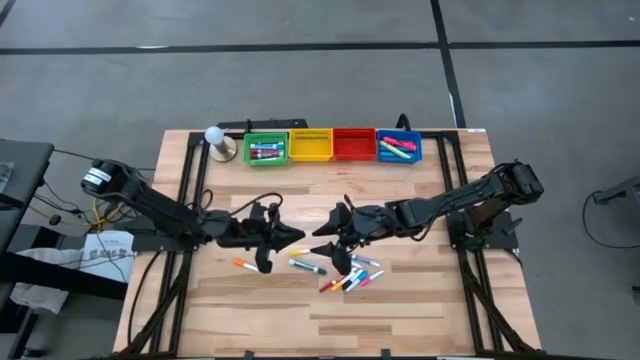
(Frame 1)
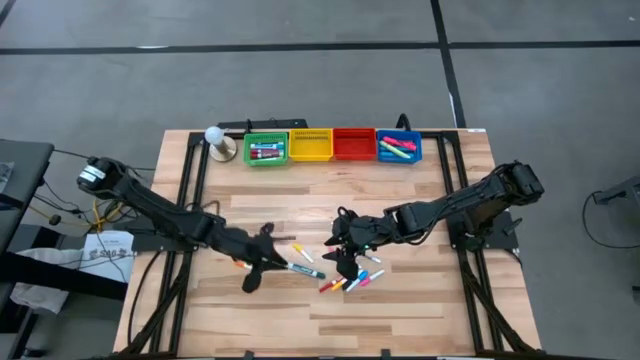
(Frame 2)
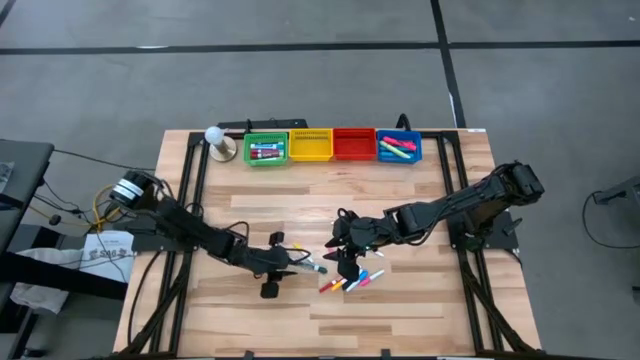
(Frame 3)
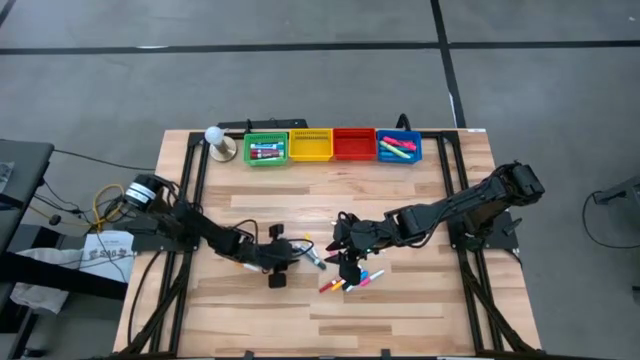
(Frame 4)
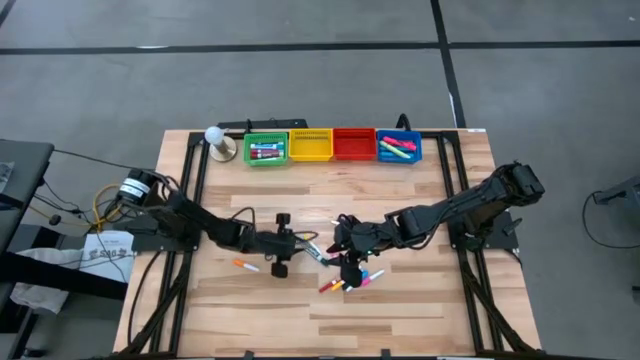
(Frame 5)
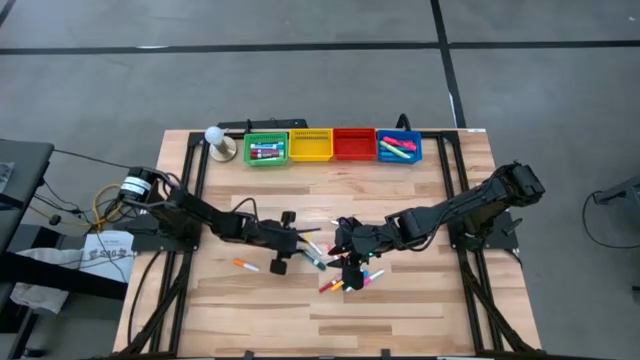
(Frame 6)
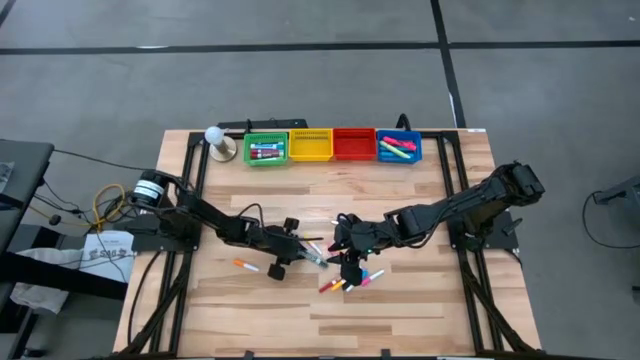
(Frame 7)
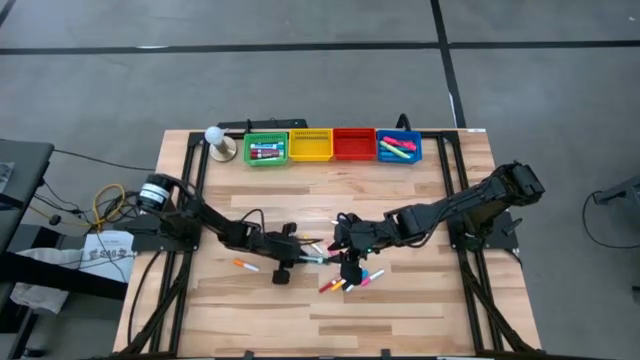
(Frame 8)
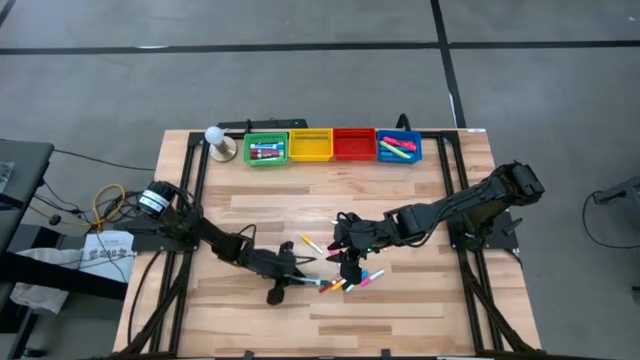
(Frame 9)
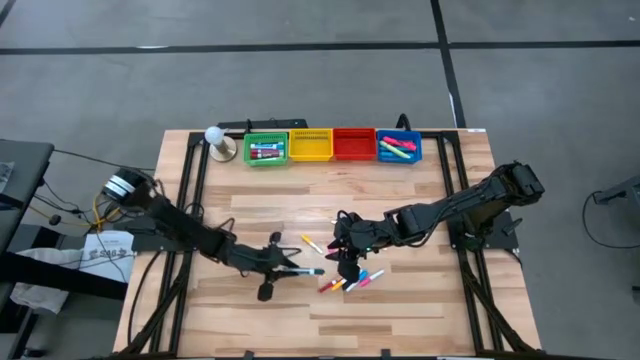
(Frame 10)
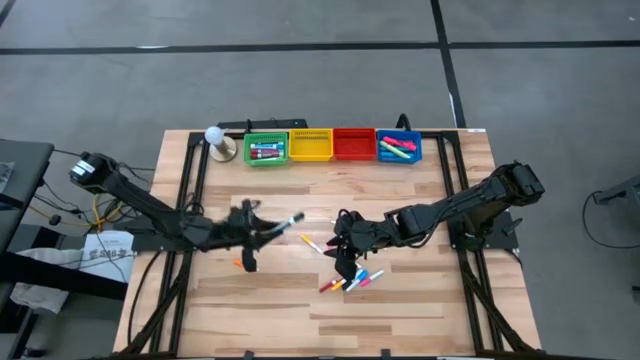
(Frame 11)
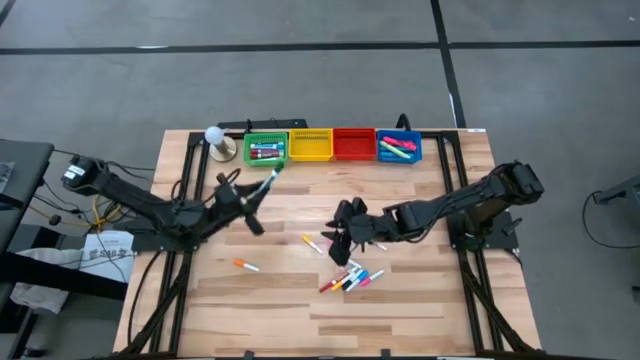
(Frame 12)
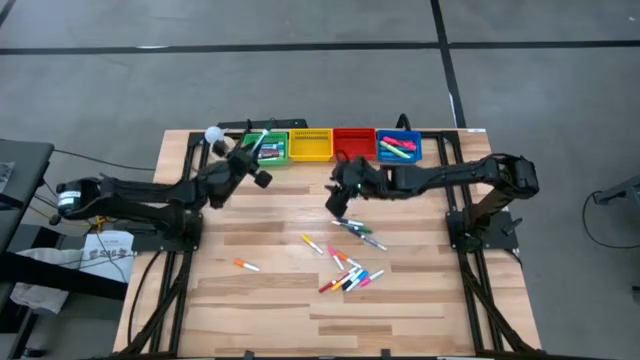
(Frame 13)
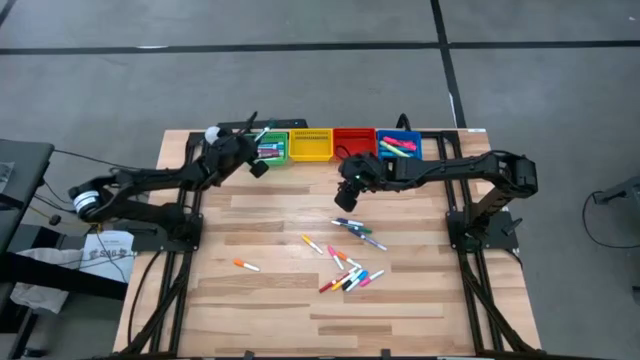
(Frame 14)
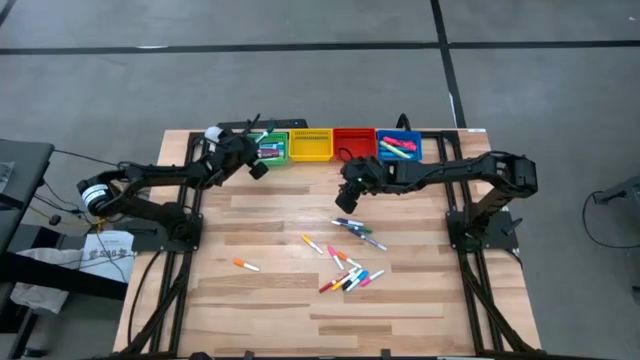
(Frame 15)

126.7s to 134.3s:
Task: Pick & Place Markers
Put the green marker pen into the green basket

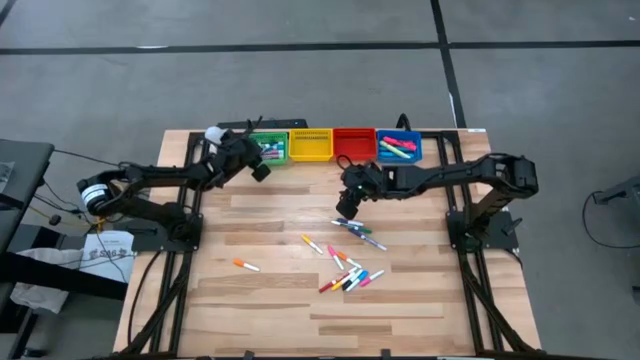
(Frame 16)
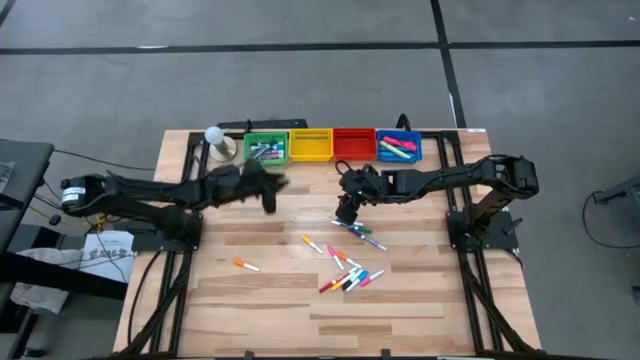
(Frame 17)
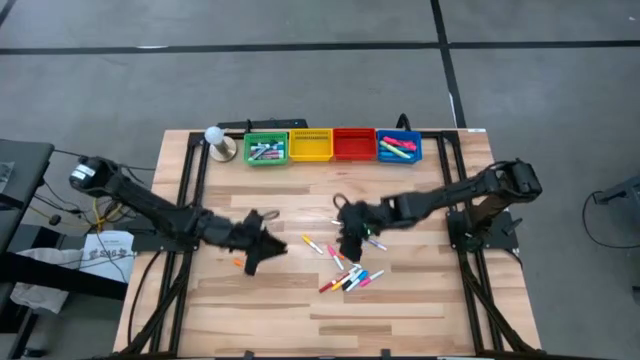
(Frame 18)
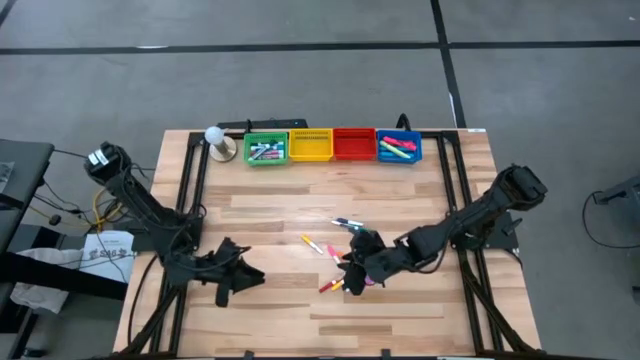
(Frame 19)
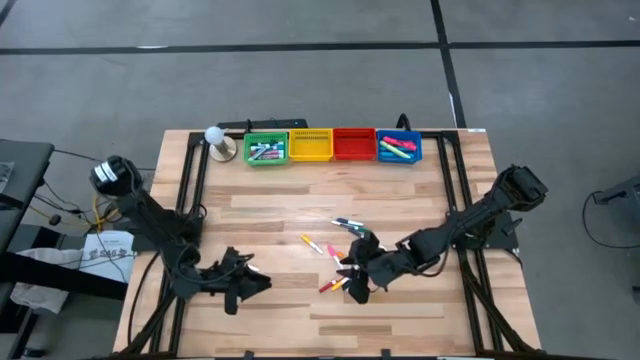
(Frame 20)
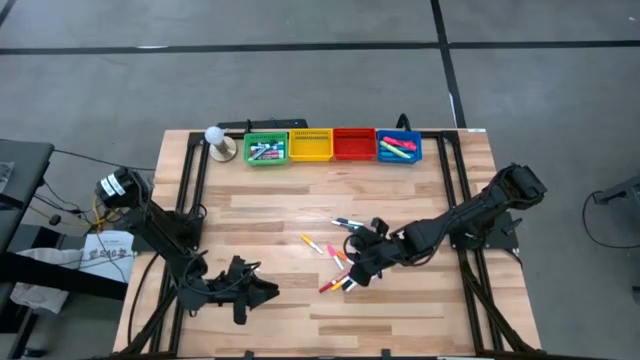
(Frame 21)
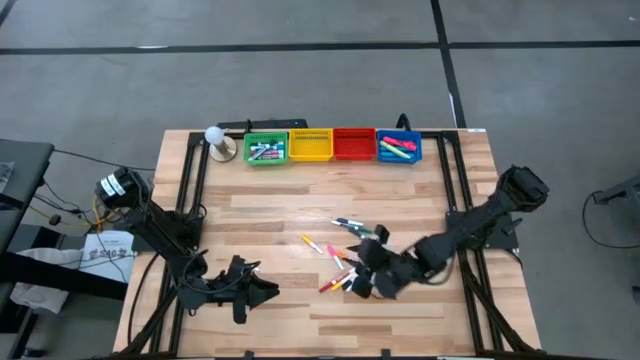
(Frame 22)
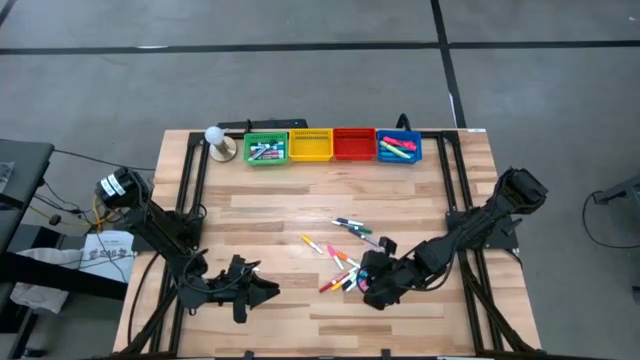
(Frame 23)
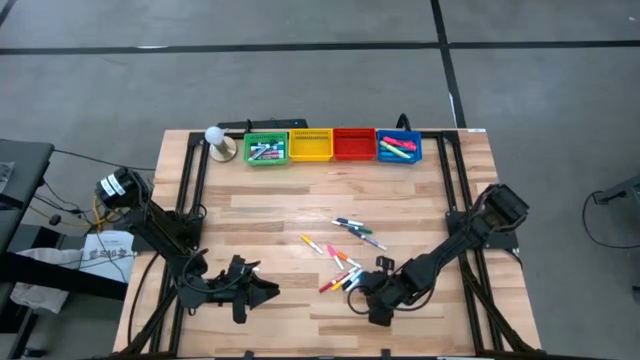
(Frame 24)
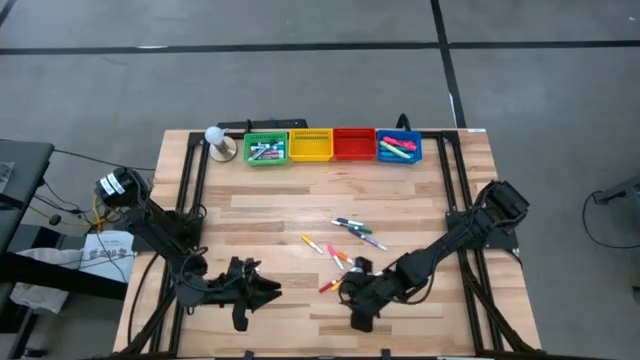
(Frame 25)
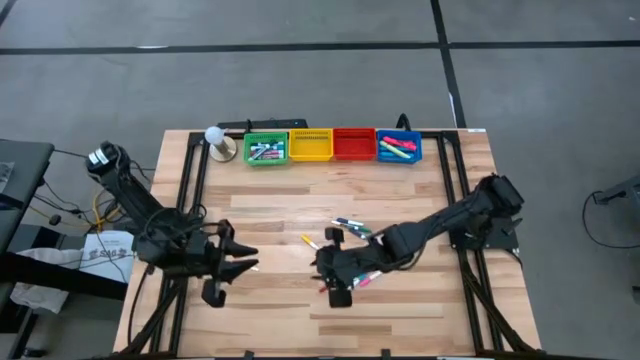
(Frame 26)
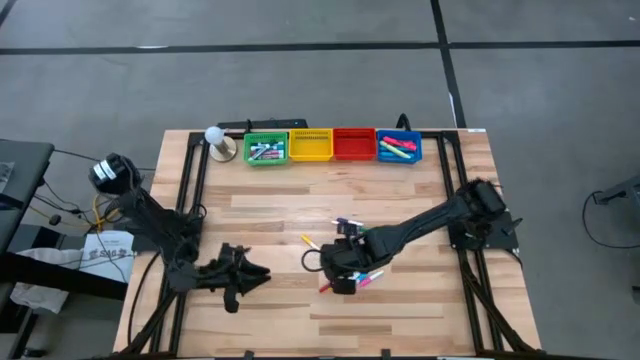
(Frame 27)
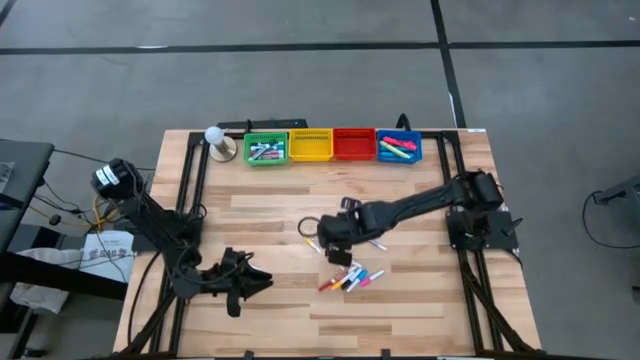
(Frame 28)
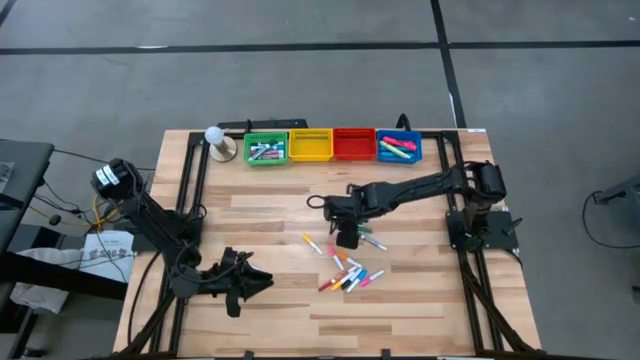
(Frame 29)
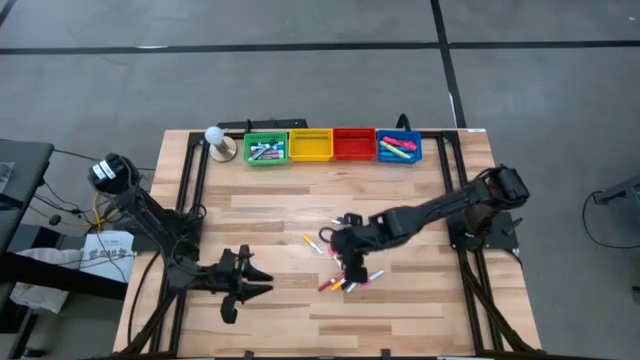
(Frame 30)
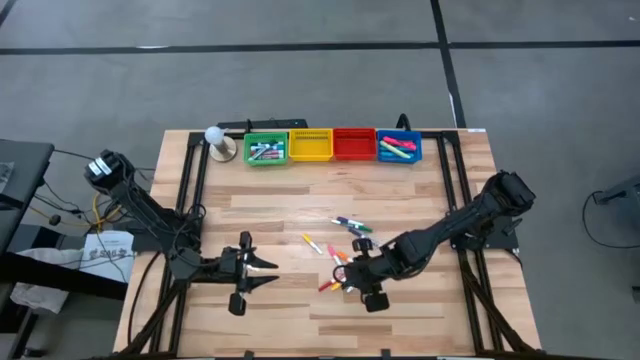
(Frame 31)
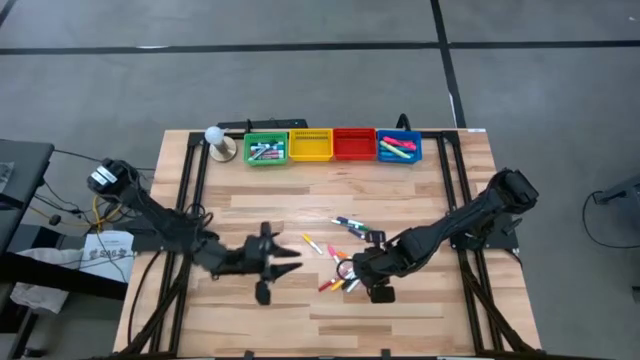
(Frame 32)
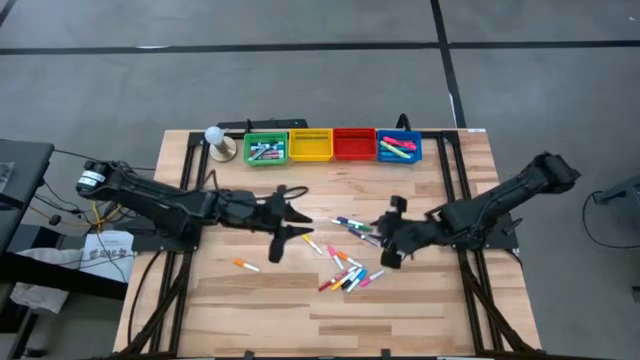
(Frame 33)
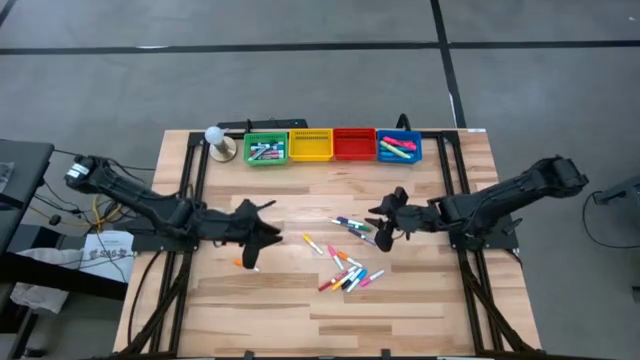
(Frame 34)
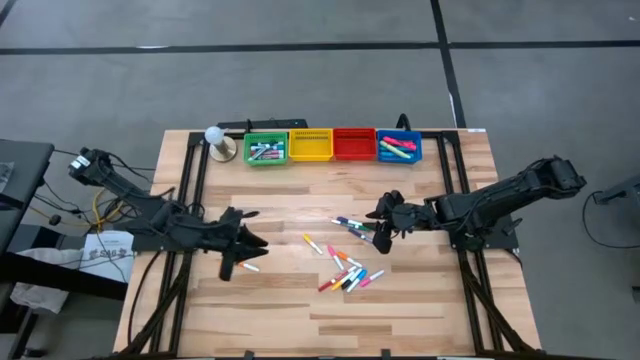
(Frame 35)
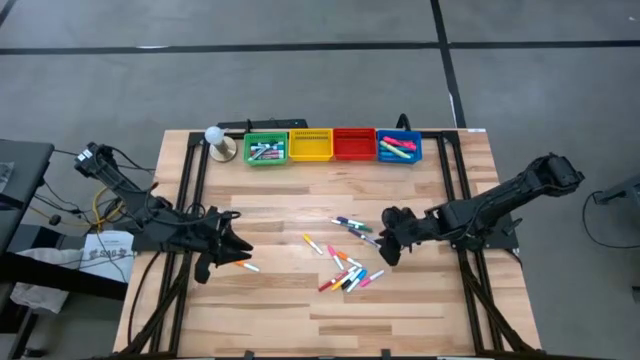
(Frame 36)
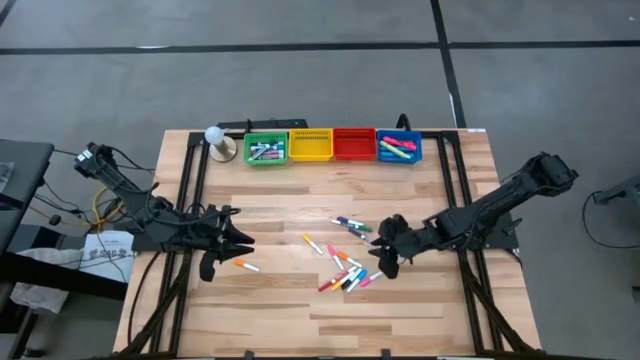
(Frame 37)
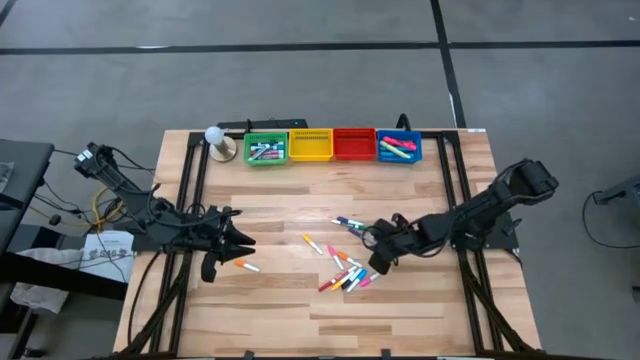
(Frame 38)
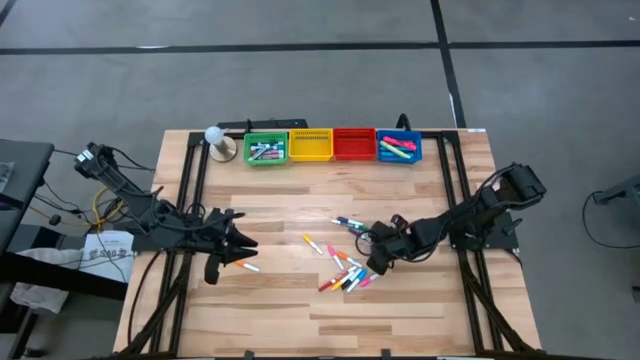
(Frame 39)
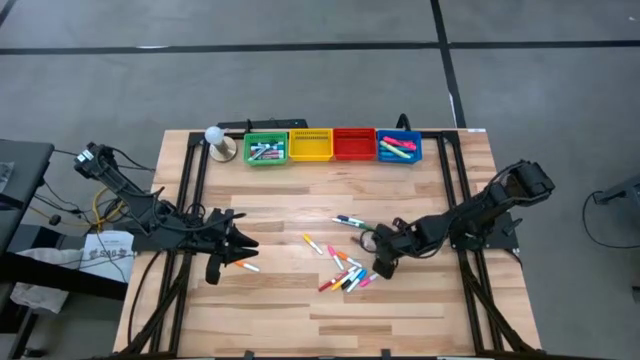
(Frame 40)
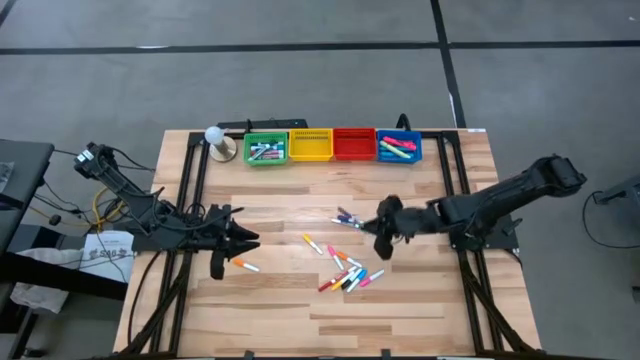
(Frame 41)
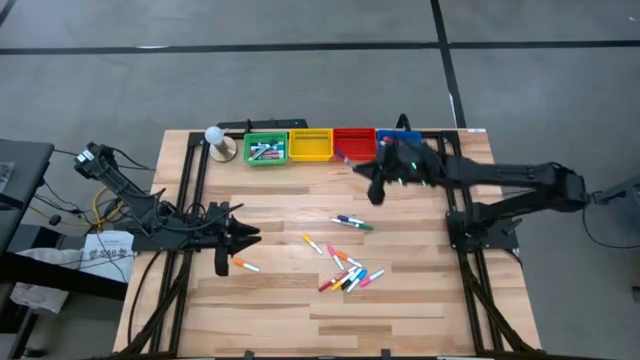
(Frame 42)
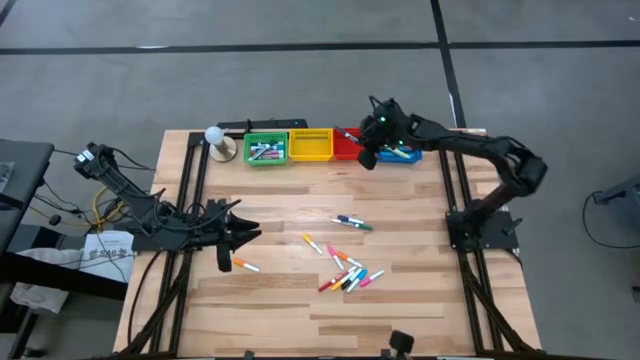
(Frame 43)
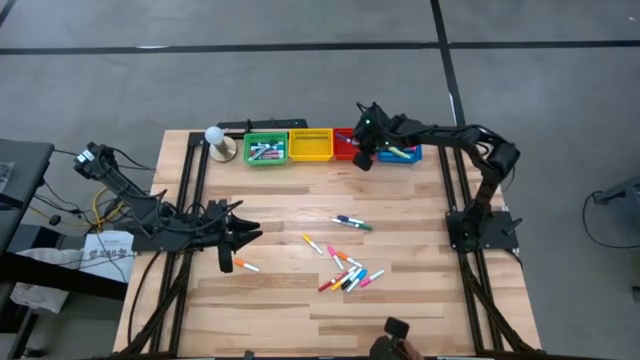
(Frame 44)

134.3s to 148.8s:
Put the blue marker pen into the red basket
